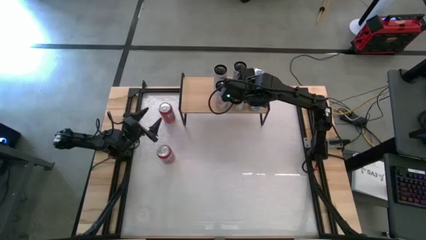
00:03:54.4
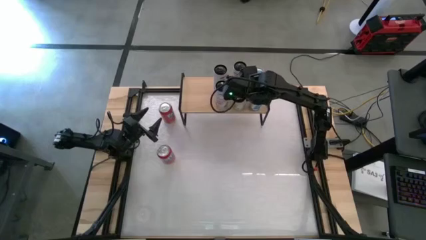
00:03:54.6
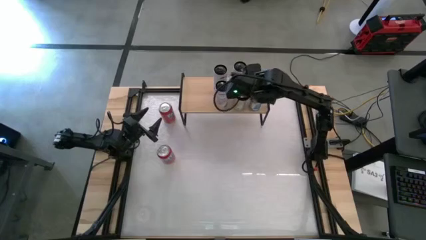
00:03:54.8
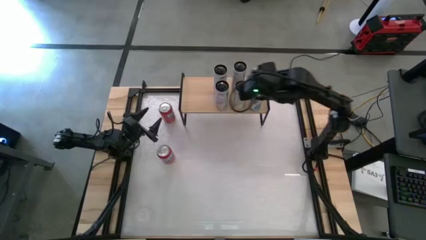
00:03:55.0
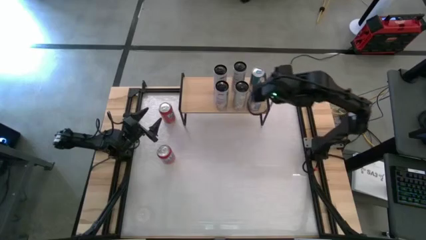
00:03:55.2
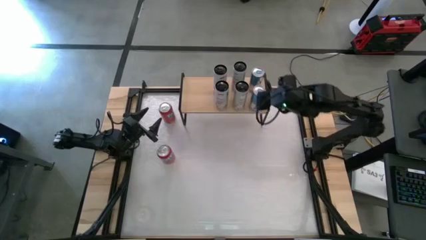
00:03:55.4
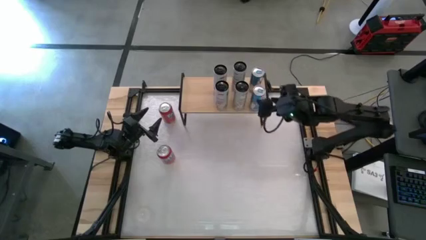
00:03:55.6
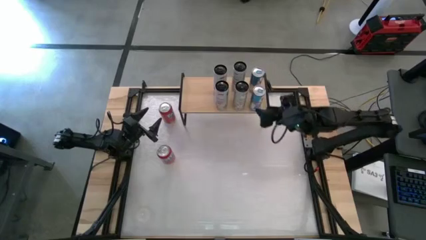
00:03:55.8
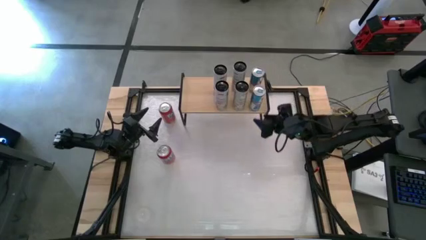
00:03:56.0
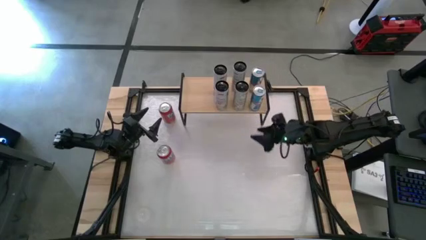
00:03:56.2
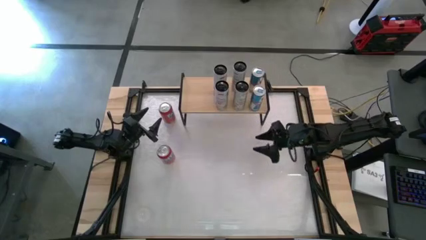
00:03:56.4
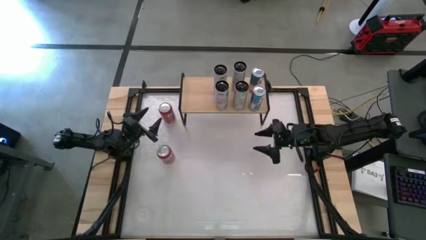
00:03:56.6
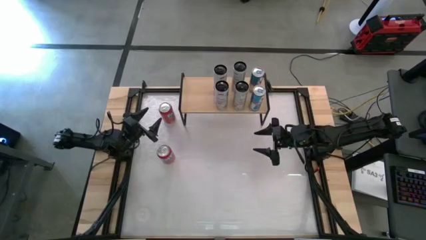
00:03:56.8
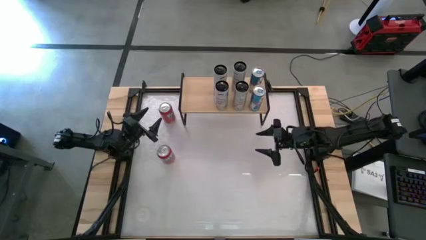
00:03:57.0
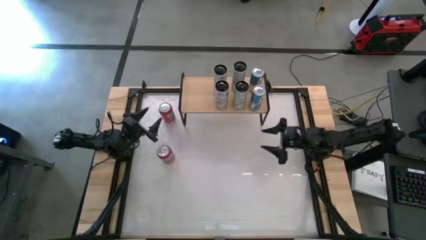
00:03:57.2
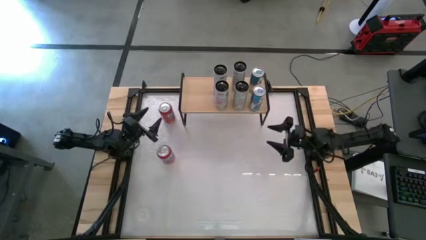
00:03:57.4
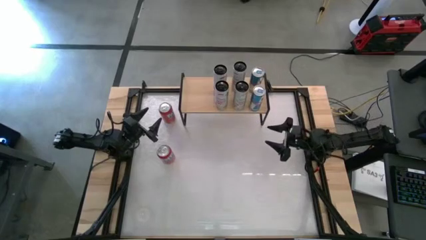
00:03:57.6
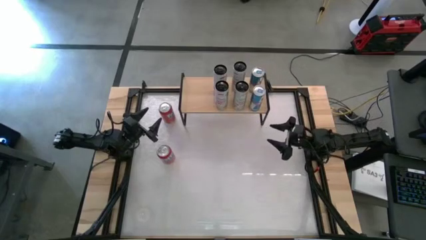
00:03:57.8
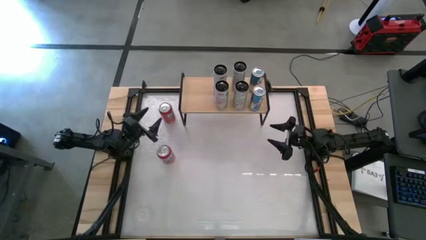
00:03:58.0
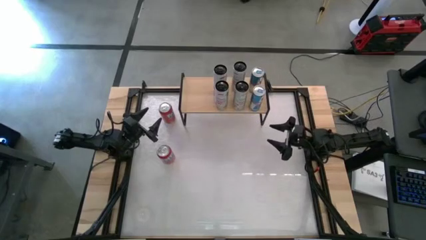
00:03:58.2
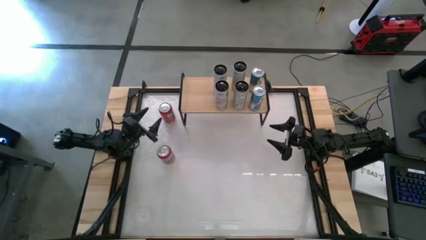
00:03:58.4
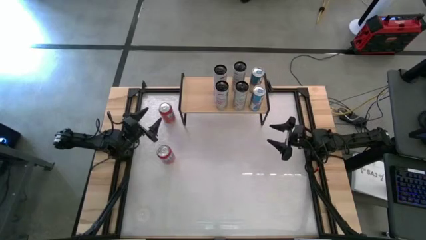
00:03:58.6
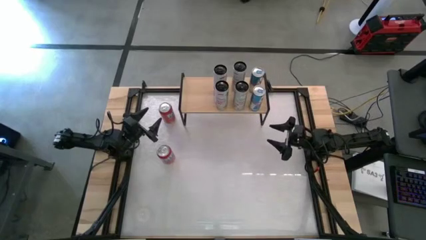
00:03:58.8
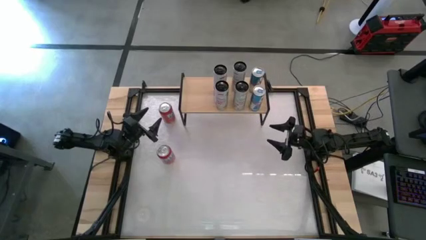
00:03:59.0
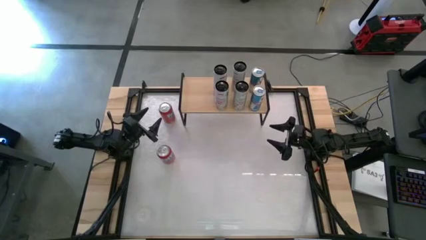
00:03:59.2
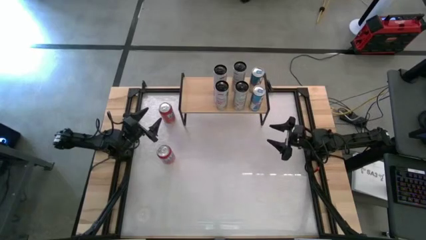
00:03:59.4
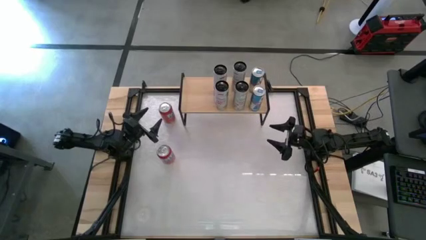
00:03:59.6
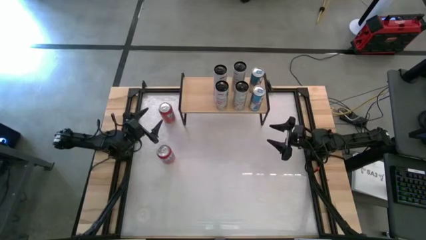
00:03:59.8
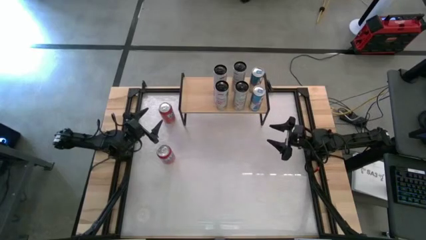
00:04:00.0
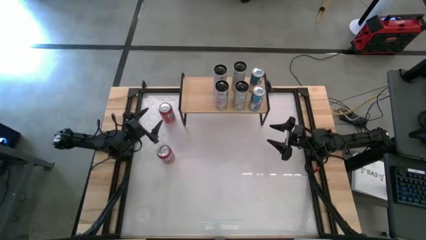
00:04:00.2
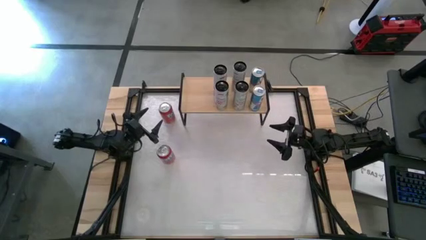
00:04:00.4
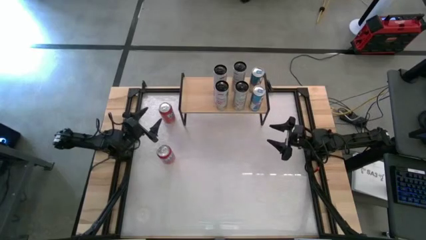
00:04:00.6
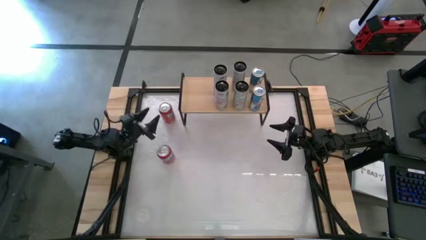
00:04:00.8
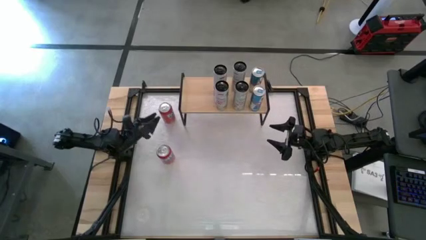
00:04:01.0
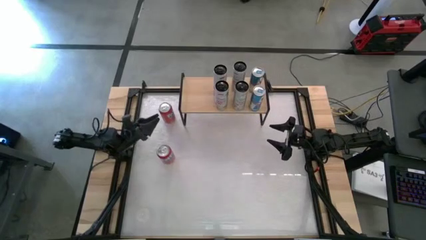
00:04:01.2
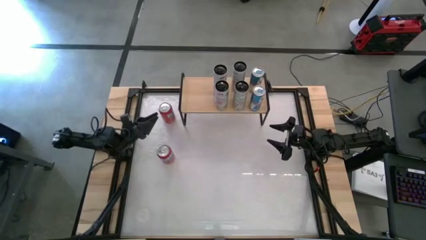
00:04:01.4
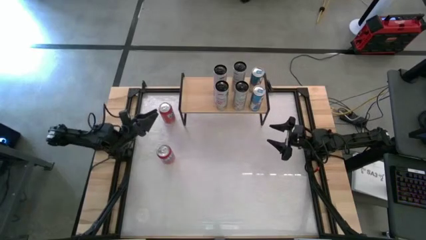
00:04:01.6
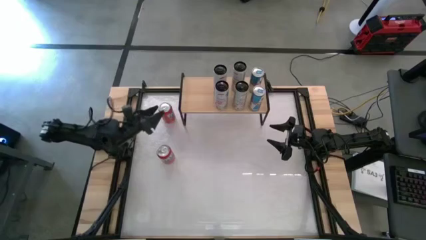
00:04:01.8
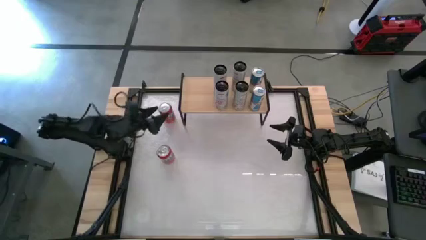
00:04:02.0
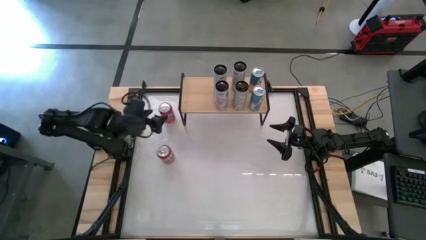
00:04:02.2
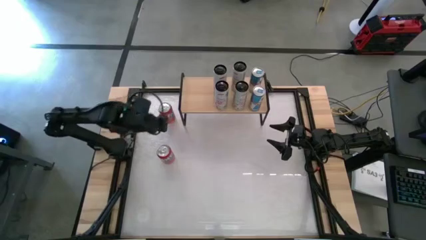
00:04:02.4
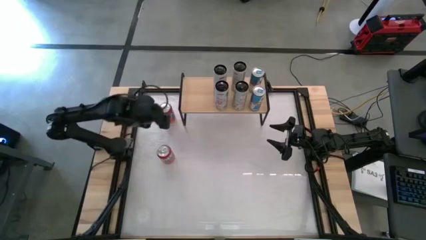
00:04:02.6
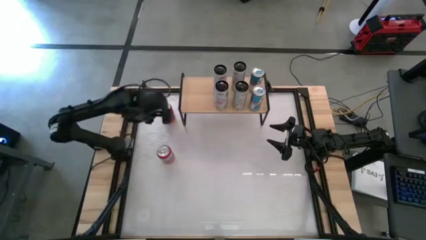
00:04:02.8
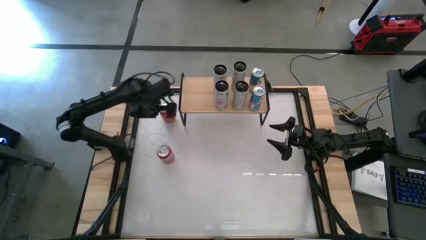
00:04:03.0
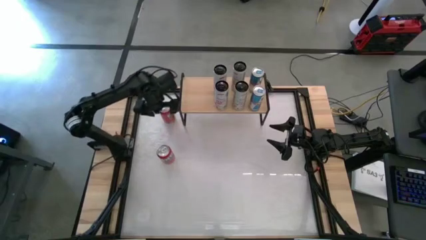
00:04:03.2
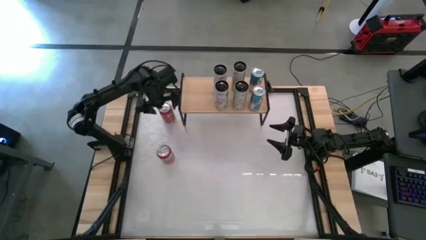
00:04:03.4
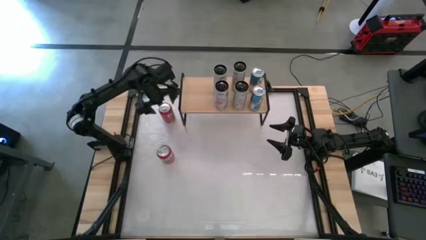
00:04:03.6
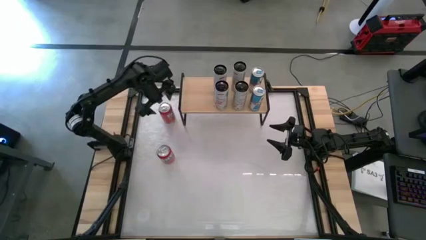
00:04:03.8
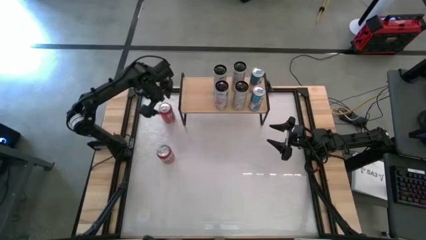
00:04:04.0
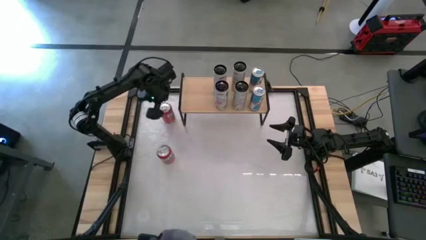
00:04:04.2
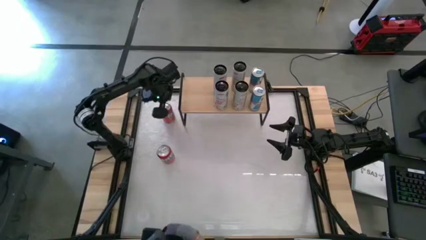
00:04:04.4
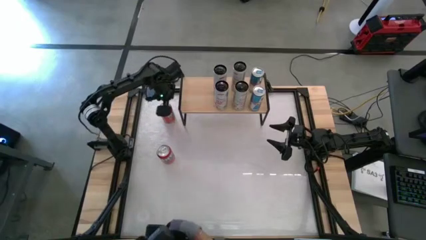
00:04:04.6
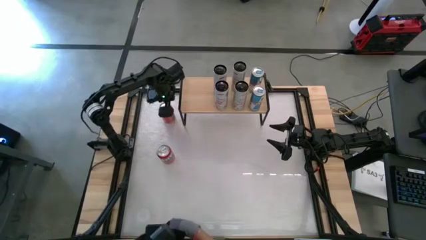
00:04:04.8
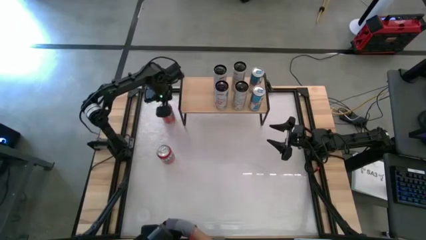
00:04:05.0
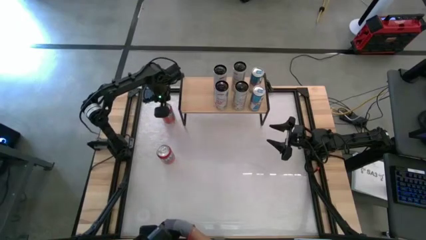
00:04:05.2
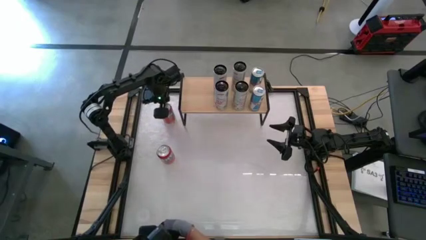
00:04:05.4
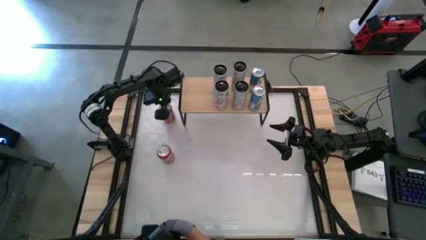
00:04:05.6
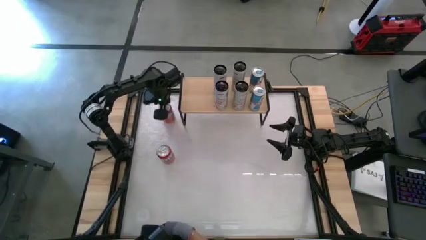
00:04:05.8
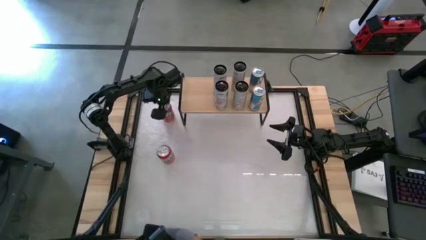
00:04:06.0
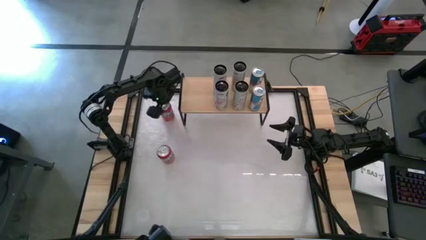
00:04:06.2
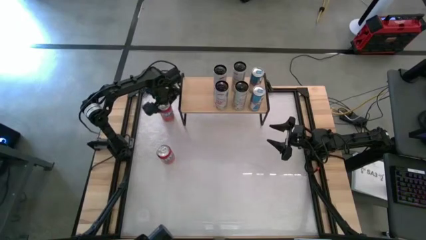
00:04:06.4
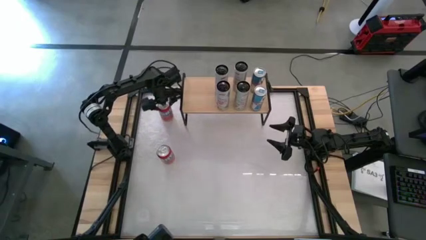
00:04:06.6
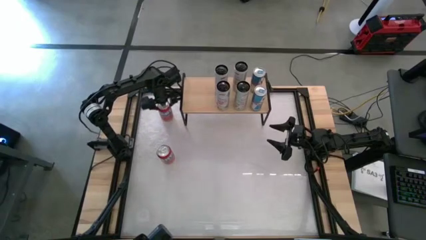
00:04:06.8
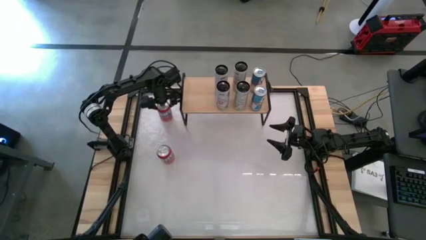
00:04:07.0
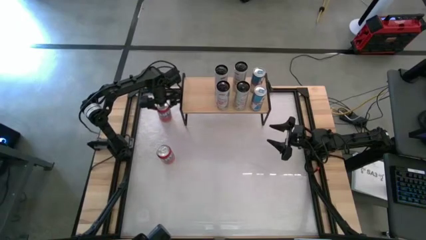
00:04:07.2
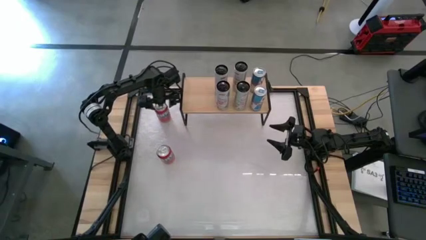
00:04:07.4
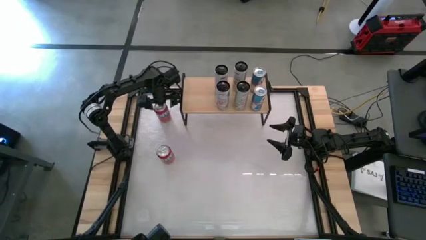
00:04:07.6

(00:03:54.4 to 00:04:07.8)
Task: Place canned beverage on shelf
Put the top orange soda can on the shelf

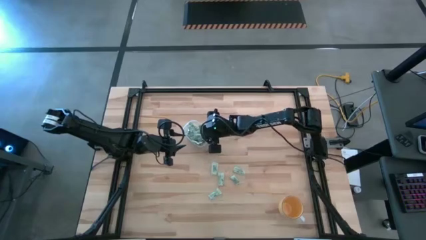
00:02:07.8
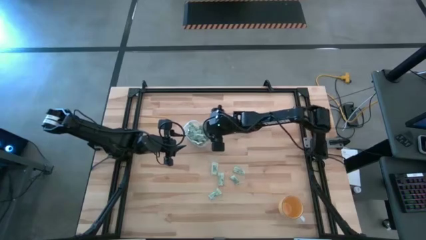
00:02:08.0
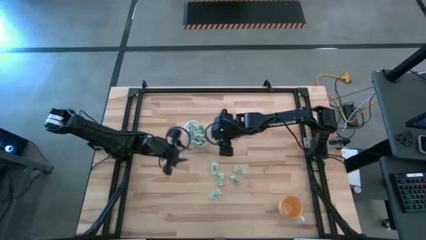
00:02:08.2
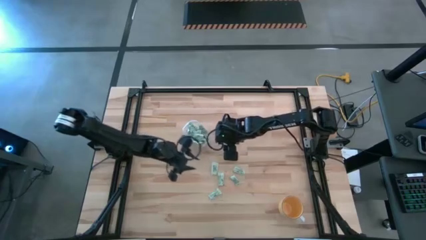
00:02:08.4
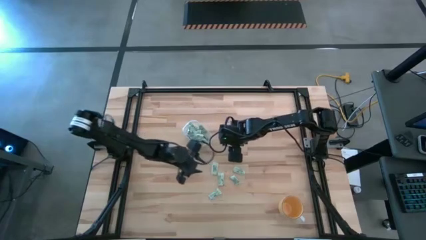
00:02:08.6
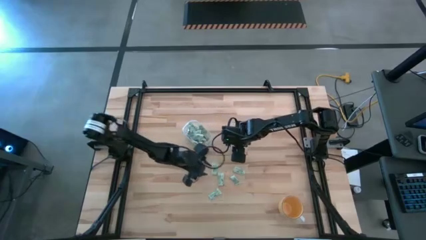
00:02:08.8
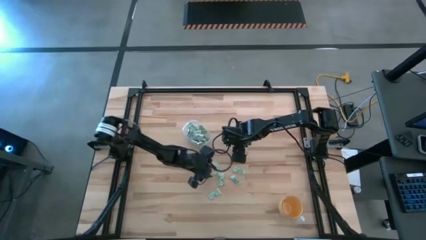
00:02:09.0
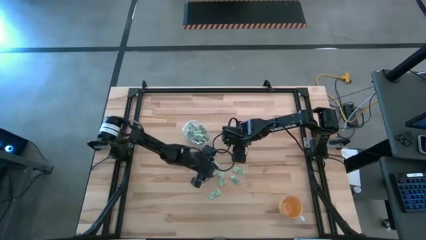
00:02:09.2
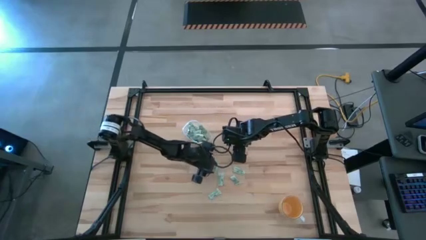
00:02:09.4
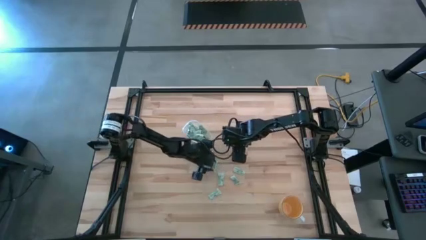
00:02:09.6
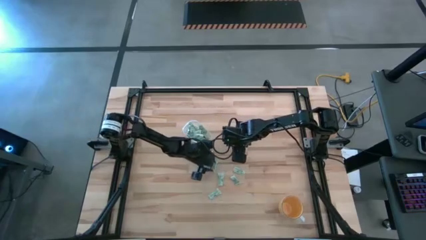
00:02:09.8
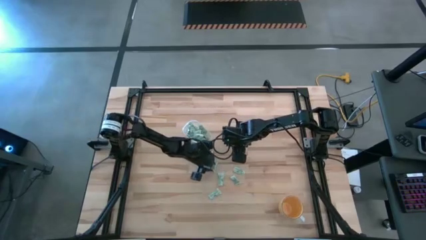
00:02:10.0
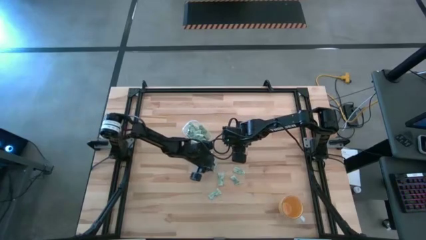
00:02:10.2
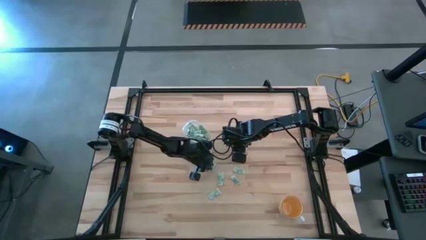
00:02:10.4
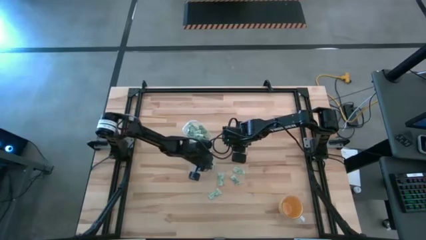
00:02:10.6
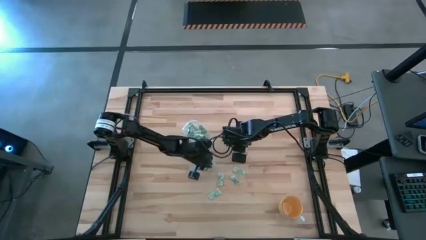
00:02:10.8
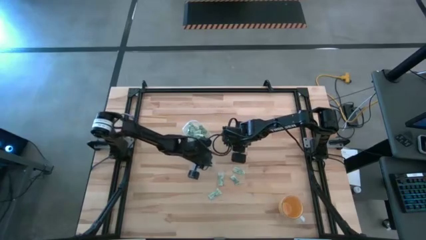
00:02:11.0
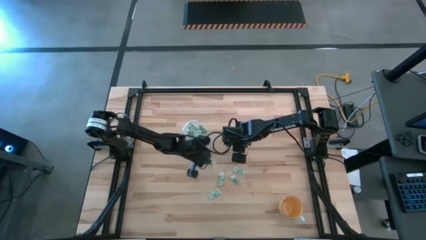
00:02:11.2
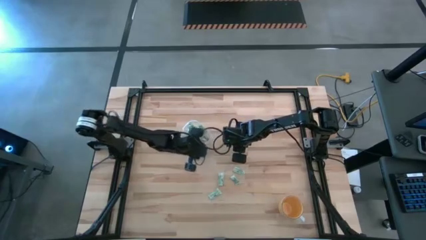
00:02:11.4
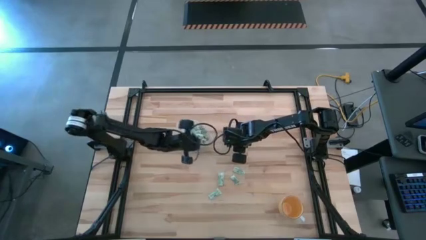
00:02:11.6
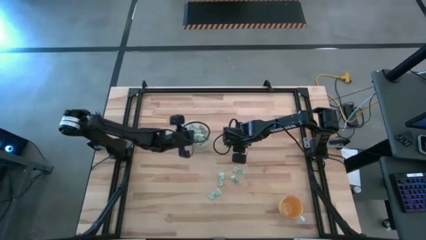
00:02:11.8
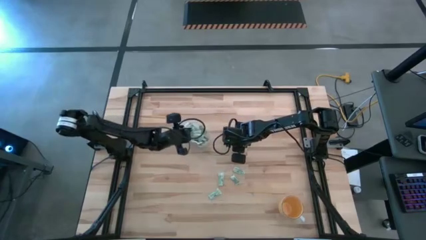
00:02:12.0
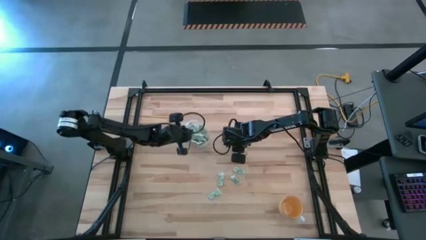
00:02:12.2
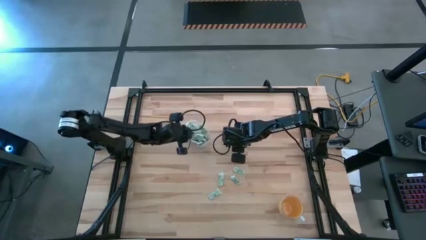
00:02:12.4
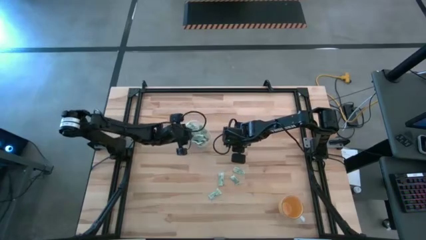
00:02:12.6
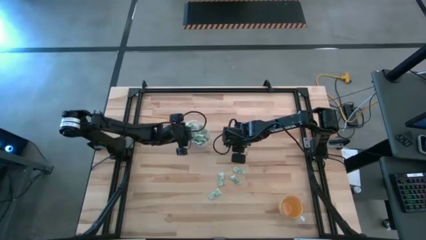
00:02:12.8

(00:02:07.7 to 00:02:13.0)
Task: Pick and place Stevia / Truvia into bins
Put the stevia packet into the transparent bin
